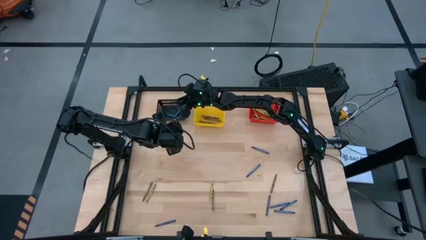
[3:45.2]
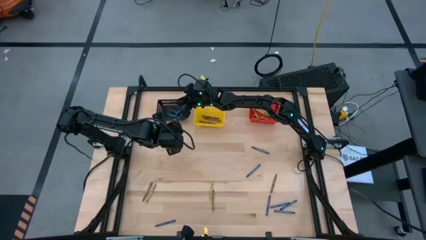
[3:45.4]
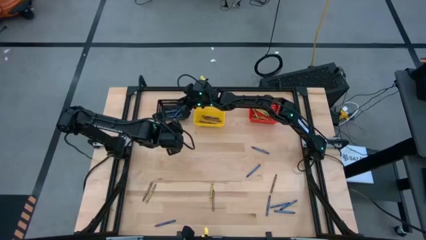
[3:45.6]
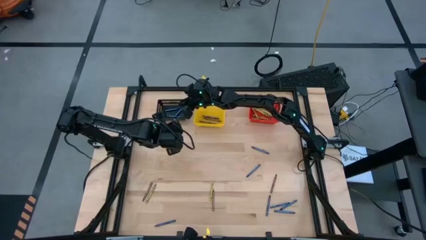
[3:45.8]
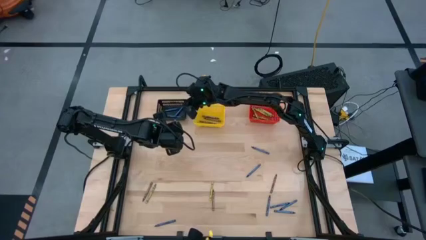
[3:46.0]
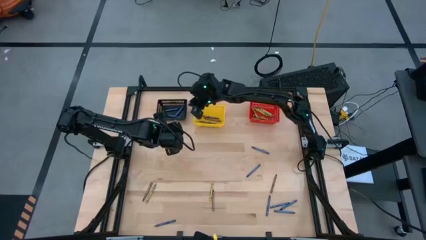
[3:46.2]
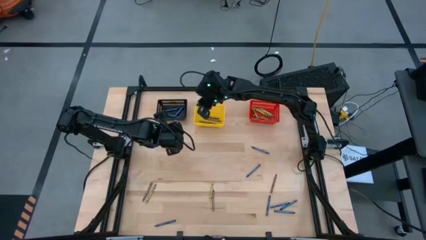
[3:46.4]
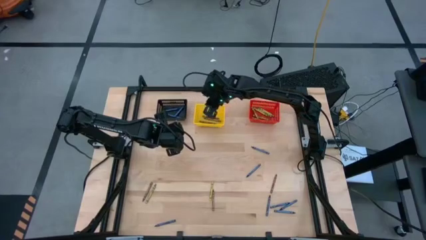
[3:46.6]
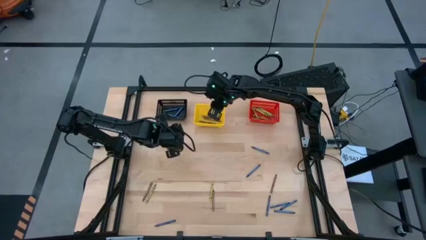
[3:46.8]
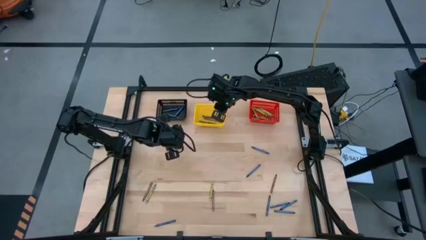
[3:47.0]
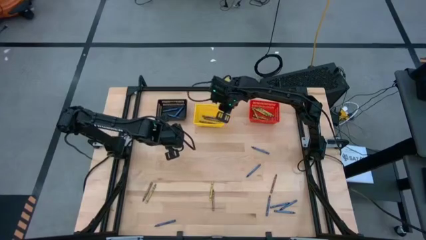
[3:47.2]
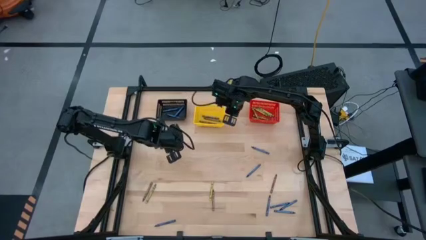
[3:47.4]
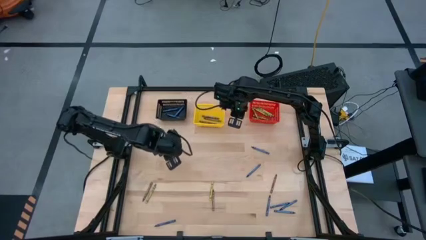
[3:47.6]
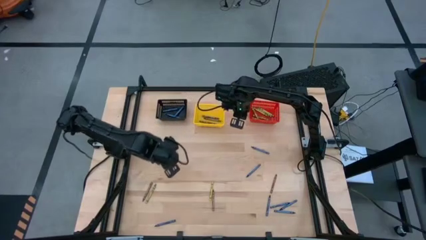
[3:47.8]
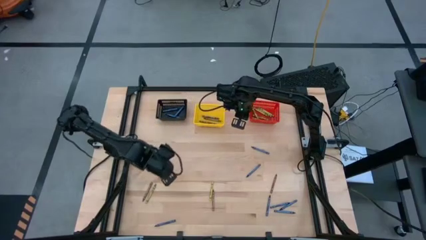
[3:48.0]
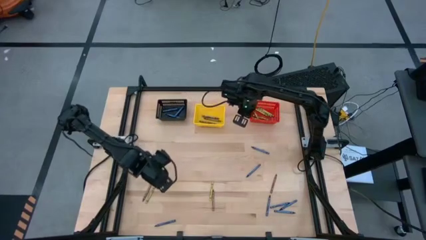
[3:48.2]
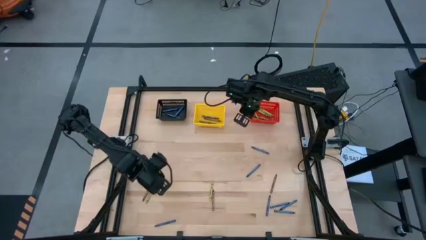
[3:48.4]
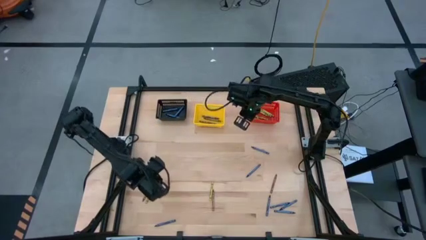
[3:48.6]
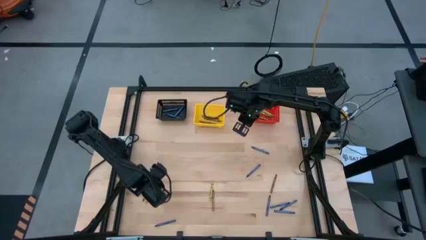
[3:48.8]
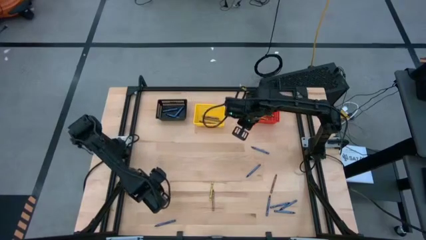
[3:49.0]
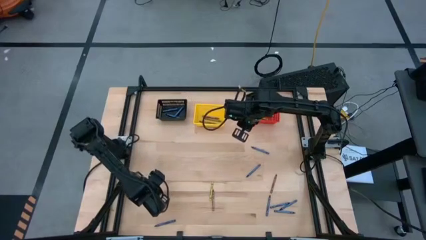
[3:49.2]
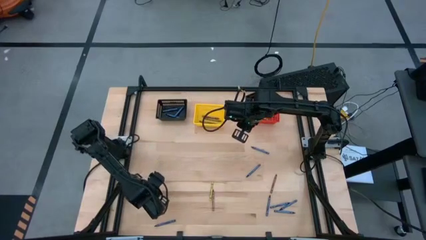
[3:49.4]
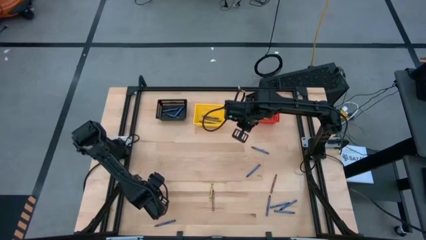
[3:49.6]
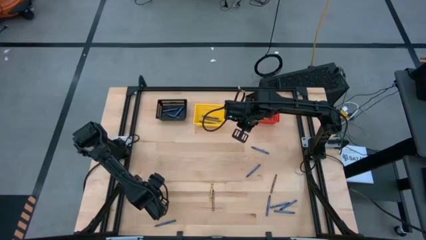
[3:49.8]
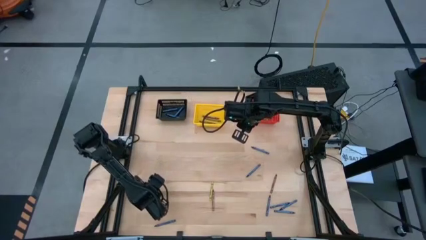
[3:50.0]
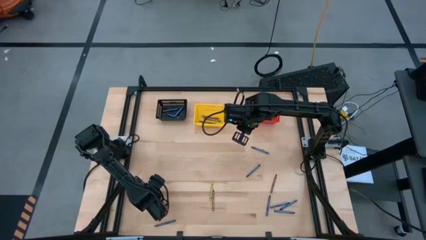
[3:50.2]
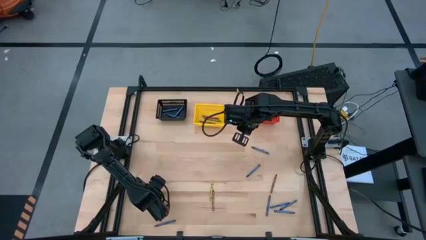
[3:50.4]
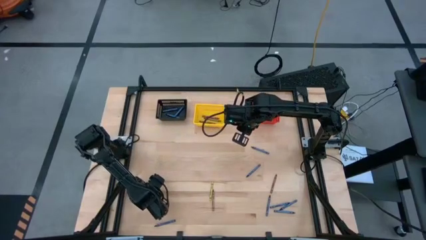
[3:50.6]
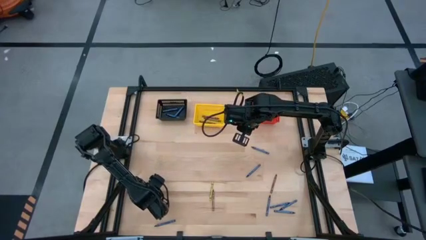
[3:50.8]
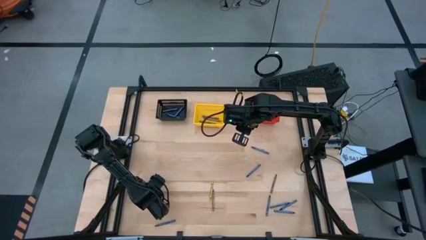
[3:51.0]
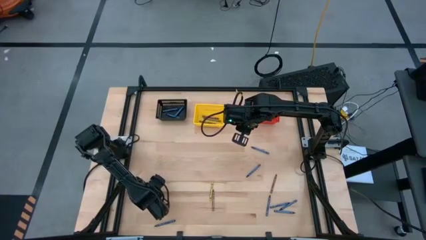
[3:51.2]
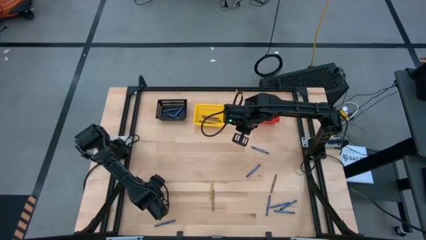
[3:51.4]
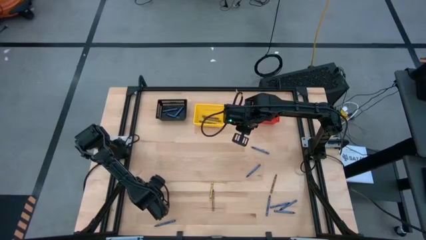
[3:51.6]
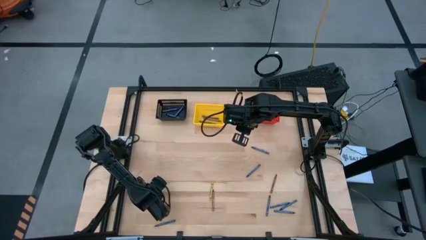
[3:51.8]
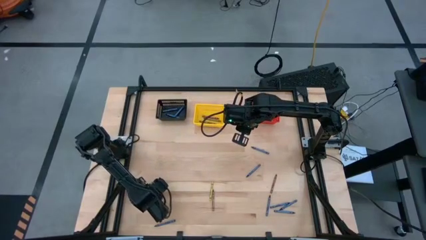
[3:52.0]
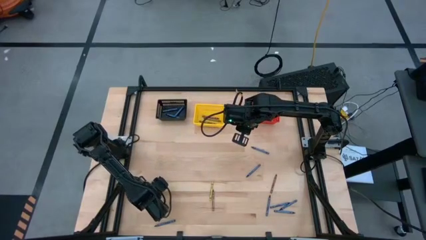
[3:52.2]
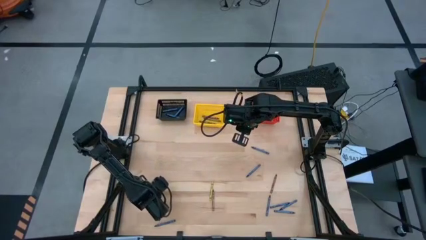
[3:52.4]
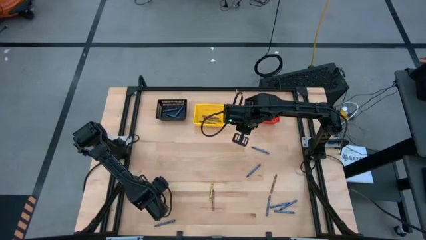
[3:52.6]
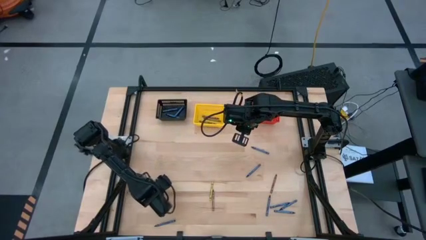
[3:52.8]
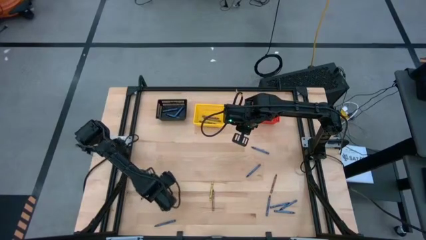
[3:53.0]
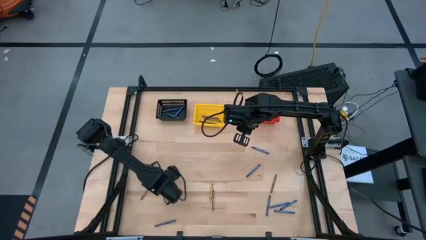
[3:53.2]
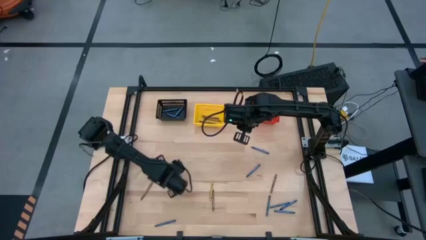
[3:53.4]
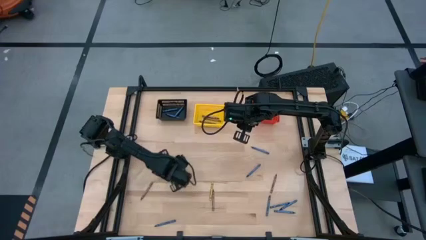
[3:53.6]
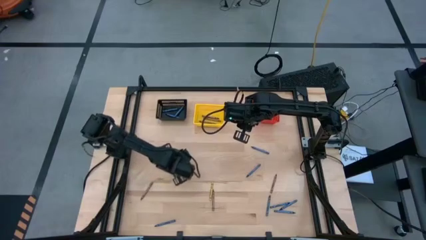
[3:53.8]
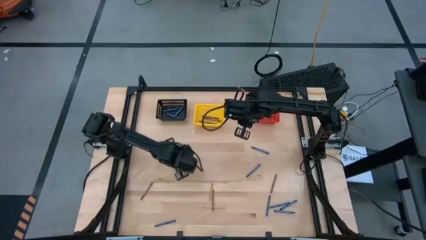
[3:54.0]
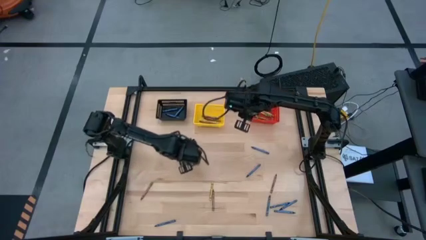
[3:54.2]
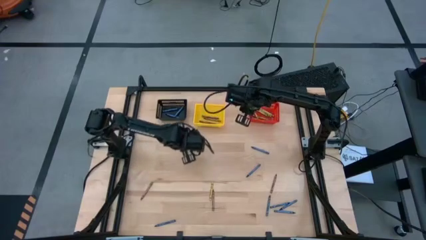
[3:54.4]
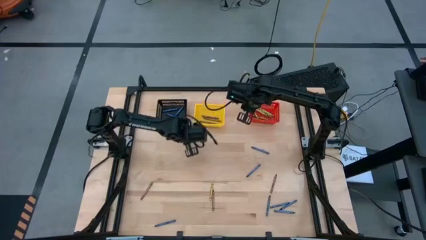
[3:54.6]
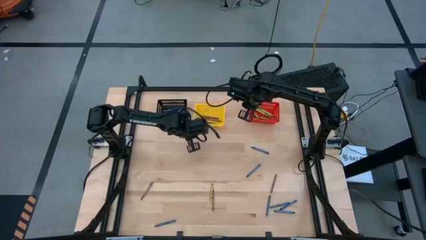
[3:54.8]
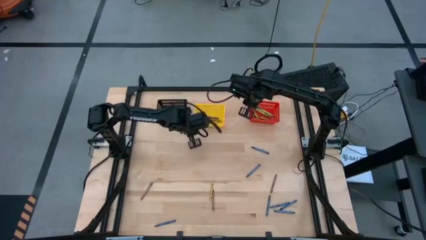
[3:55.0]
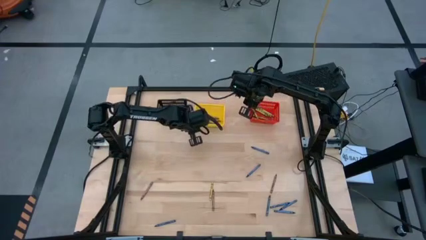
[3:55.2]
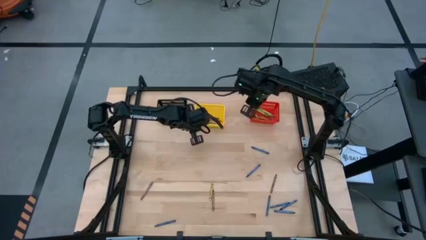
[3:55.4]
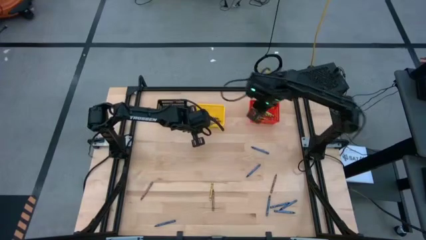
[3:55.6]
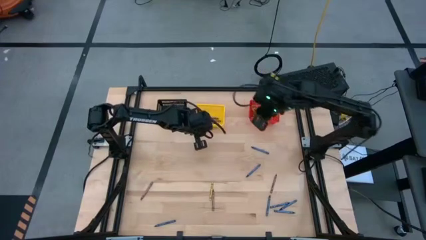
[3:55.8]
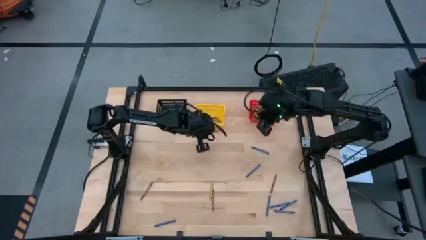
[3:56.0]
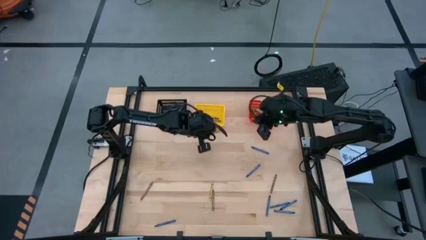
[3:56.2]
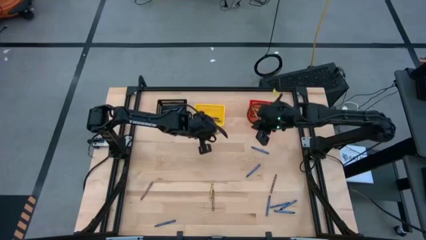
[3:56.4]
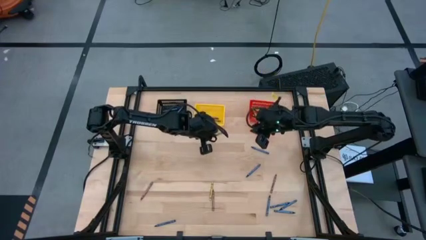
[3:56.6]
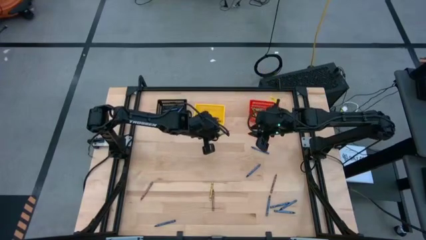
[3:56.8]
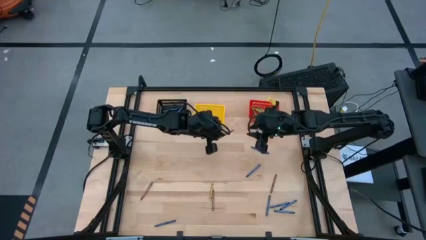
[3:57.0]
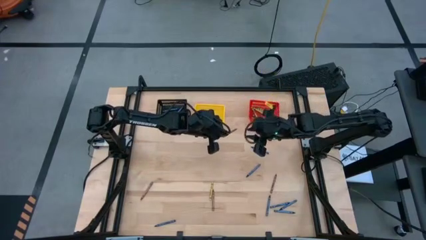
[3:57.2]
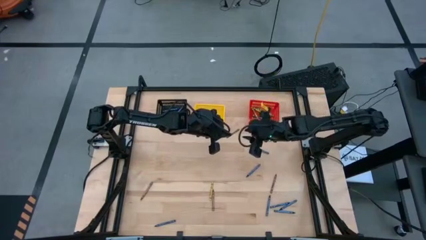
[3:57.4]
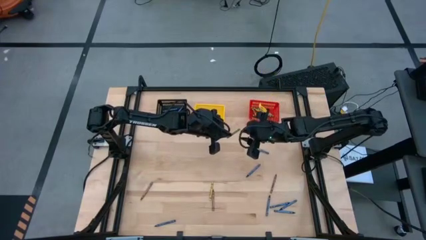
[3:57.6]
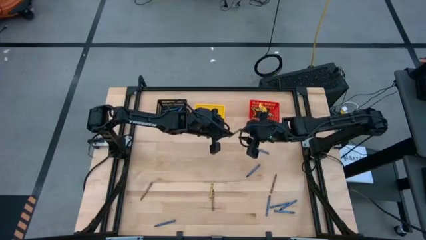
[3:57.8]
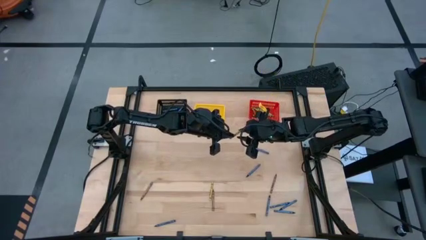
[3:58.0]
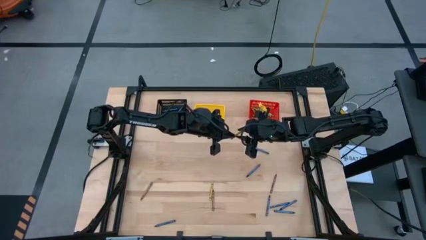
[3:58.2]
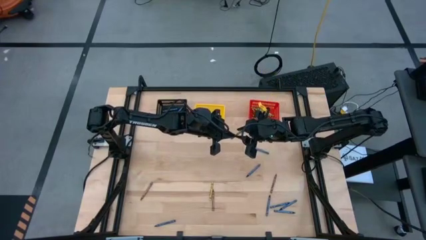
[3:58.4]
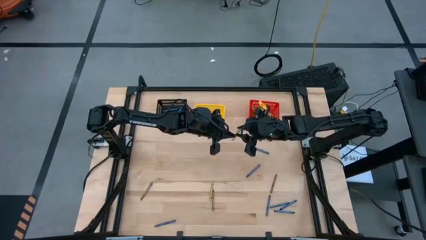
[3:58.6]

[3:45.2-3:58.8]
Task: Sort crayons
Put the left green crayon into the red bin

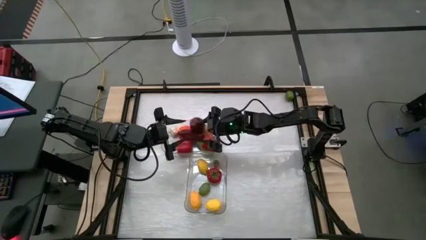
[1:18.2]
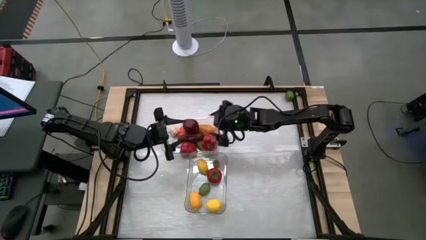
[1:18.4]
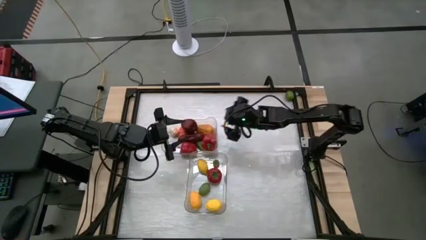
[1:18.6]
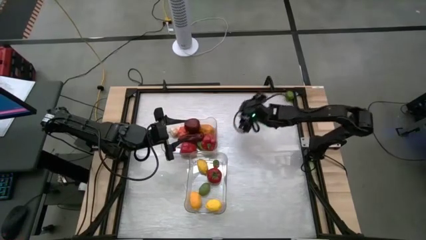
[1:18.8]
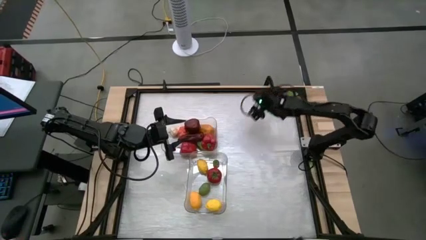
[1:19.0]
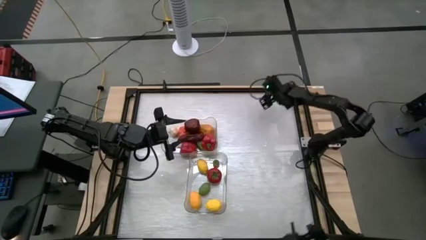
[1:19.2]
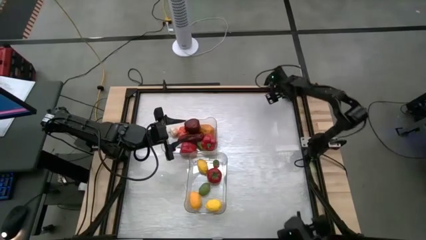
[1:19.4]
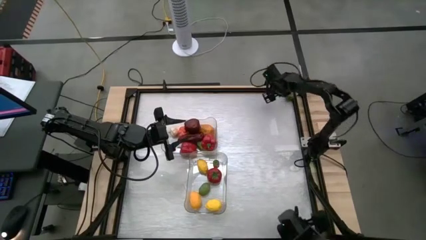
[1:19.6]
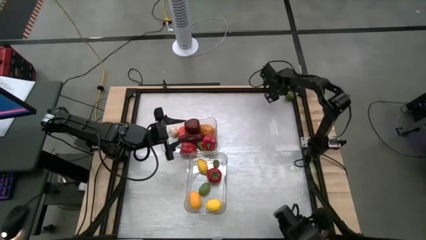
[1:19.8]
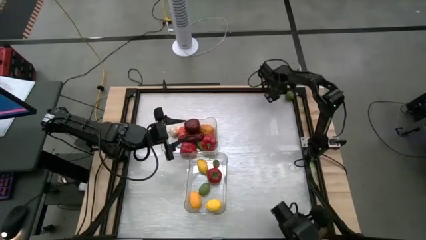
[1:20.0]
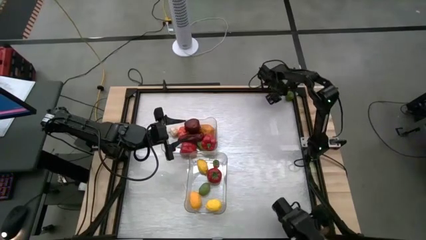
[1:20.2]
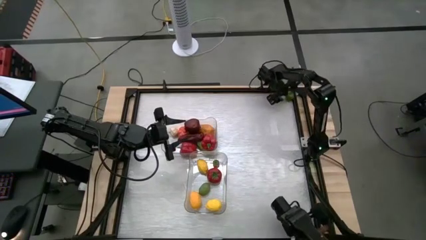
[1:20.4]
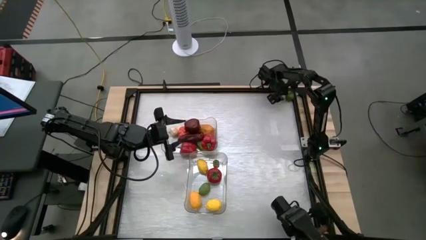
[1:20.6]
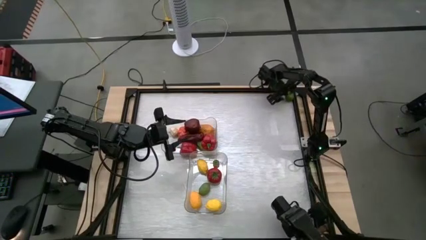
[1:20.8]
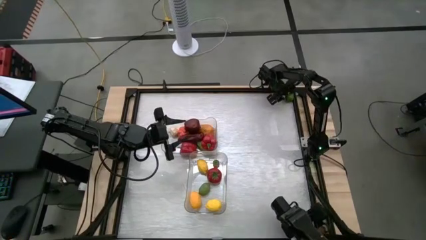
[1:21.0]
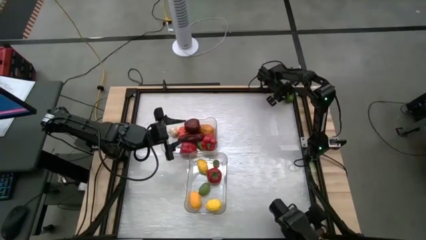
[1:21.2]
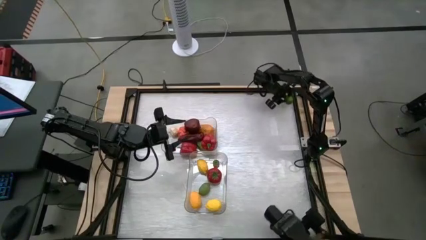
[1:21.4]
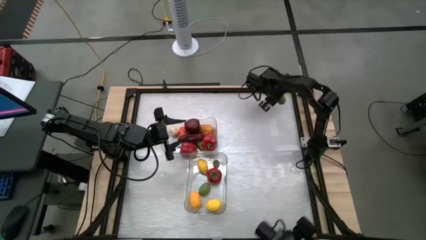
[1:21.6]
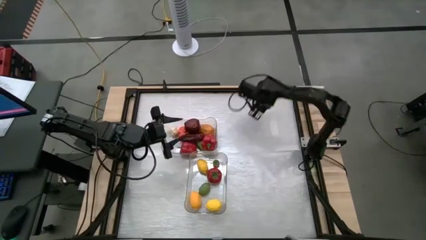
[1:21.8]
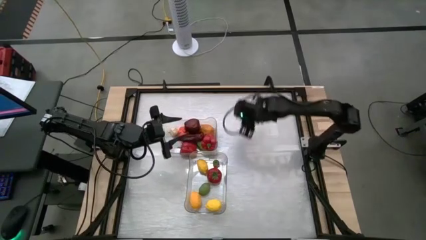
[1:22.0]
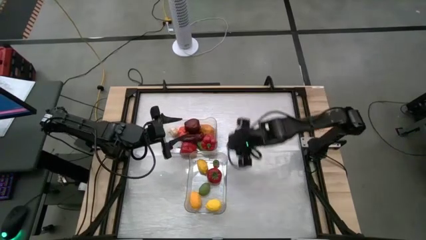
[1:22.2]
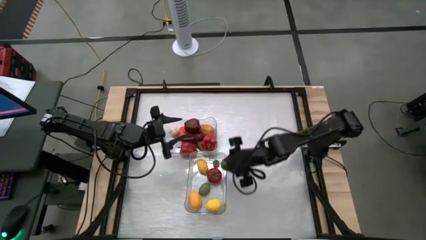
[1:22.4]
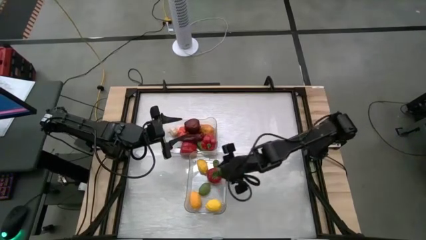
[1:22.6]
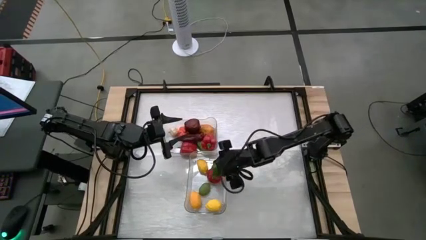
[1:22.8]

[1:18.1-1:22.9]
Task: Sort produce into baskets
Put the lime into the top transparent bin
